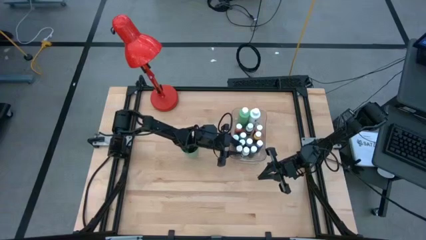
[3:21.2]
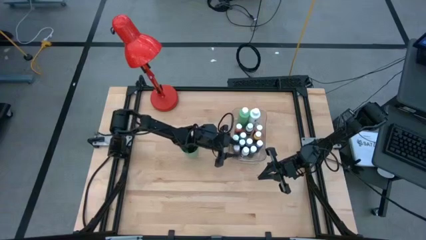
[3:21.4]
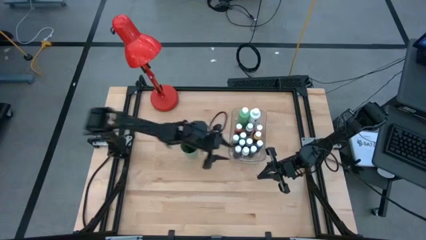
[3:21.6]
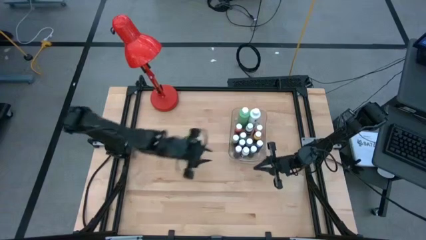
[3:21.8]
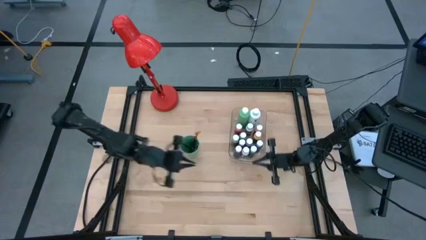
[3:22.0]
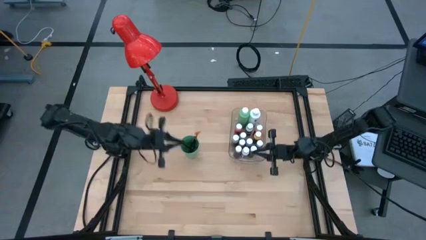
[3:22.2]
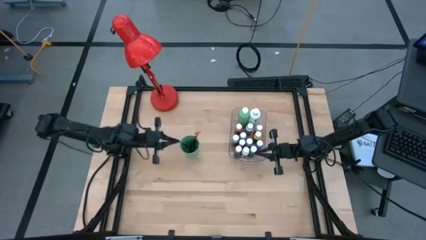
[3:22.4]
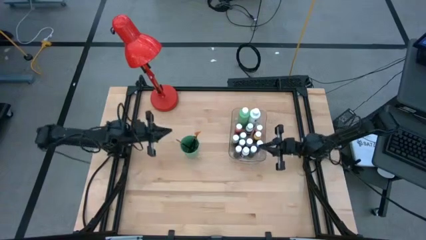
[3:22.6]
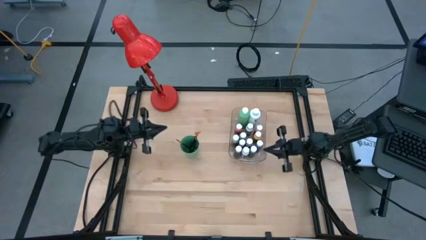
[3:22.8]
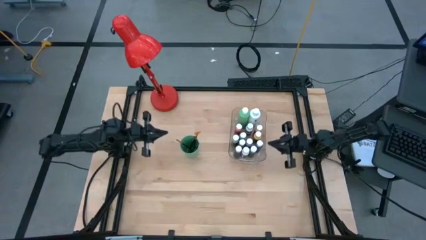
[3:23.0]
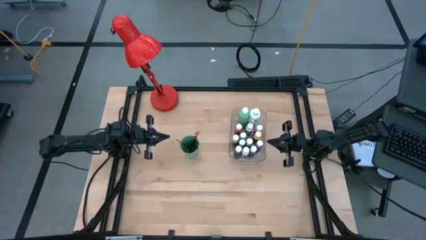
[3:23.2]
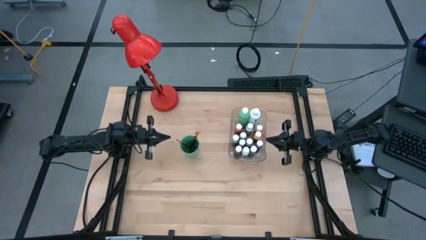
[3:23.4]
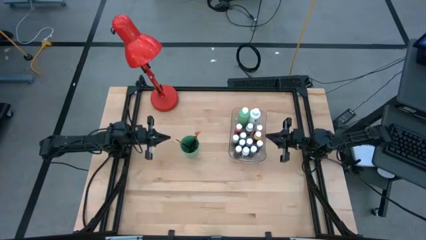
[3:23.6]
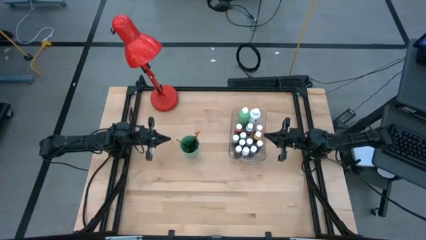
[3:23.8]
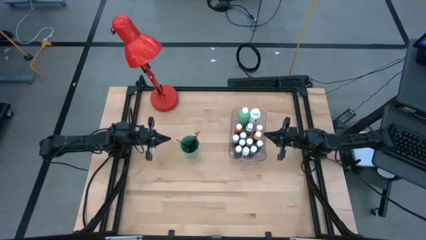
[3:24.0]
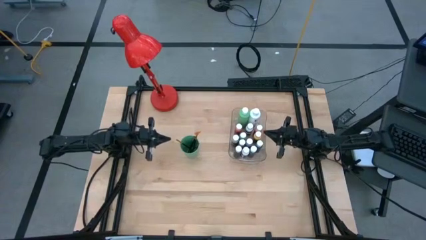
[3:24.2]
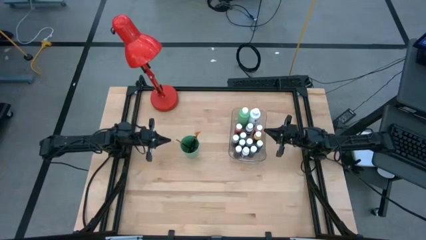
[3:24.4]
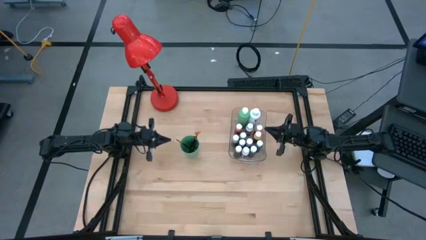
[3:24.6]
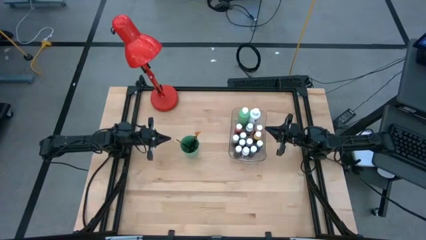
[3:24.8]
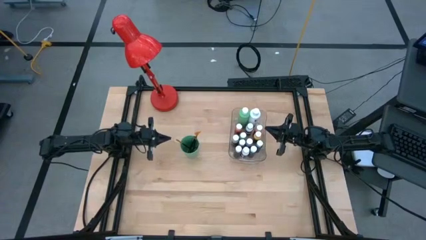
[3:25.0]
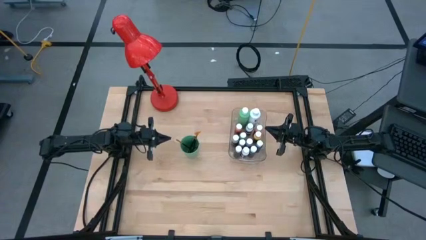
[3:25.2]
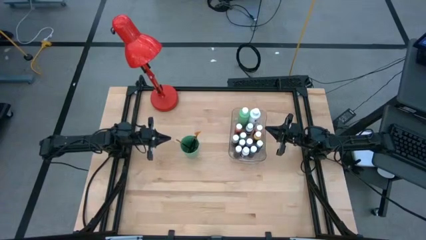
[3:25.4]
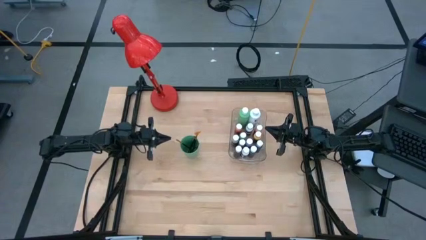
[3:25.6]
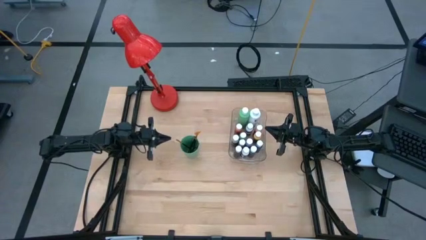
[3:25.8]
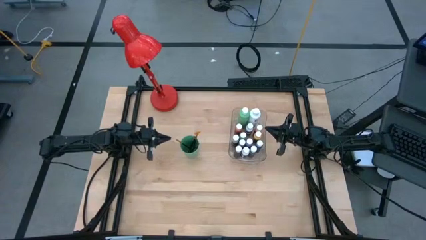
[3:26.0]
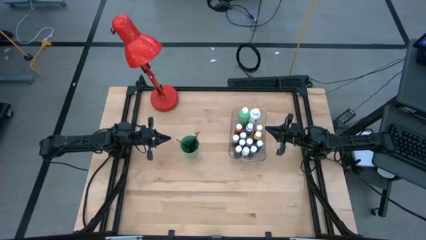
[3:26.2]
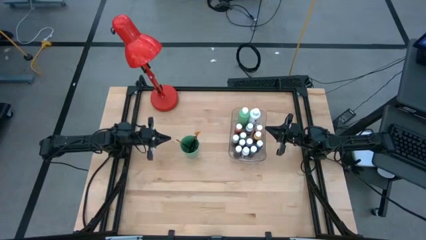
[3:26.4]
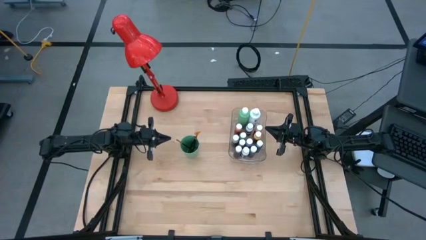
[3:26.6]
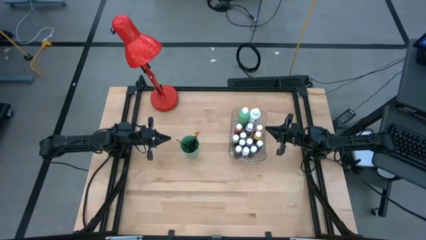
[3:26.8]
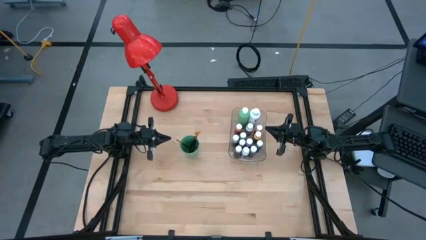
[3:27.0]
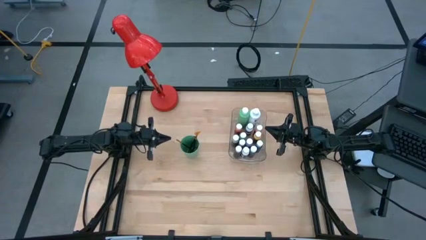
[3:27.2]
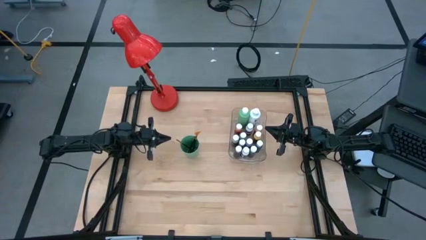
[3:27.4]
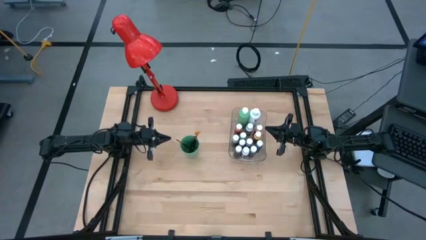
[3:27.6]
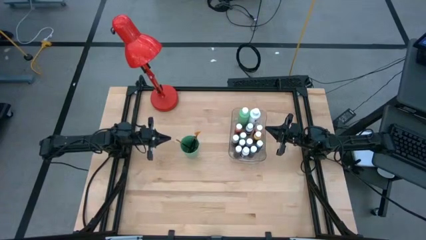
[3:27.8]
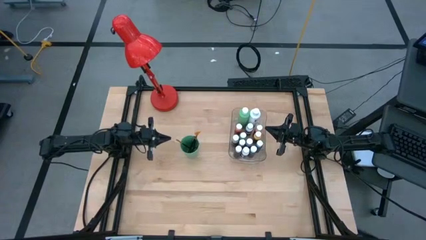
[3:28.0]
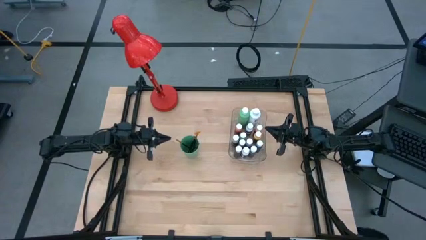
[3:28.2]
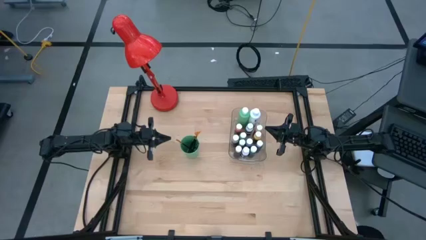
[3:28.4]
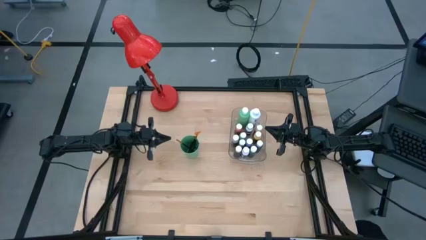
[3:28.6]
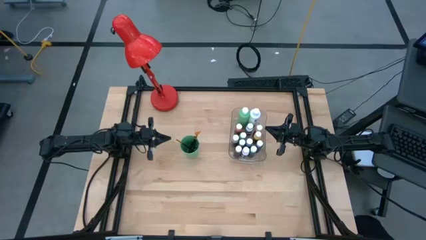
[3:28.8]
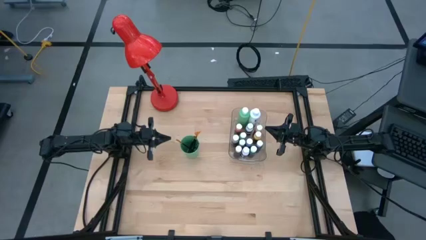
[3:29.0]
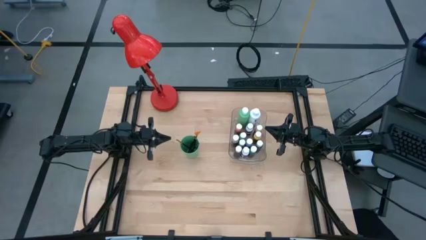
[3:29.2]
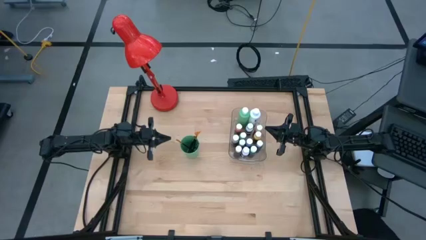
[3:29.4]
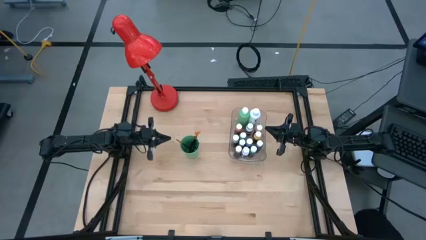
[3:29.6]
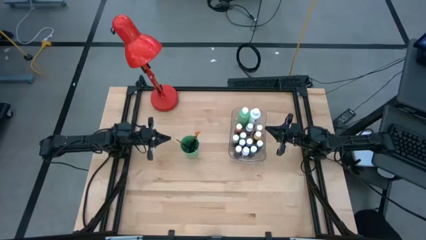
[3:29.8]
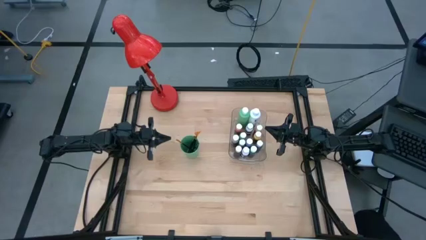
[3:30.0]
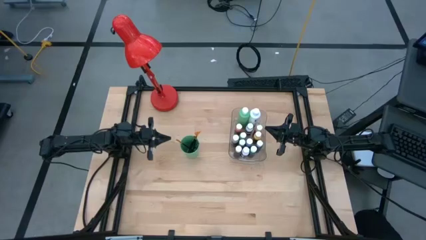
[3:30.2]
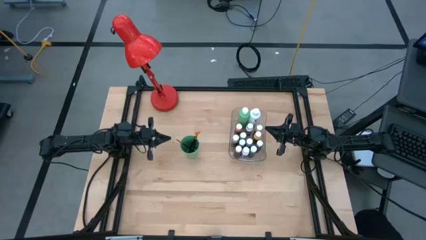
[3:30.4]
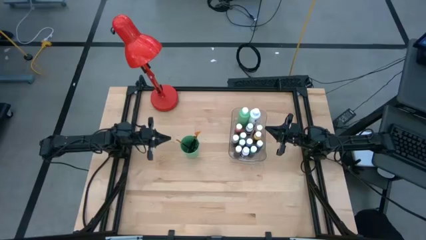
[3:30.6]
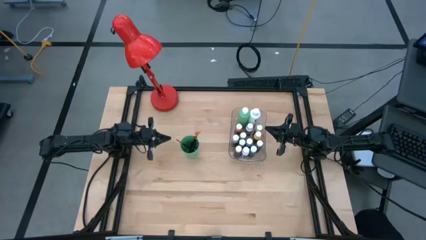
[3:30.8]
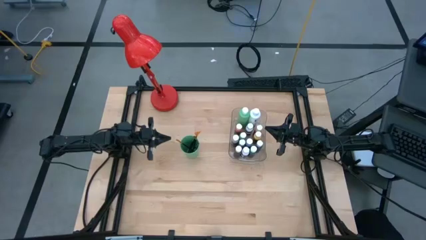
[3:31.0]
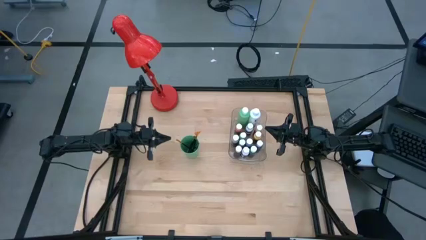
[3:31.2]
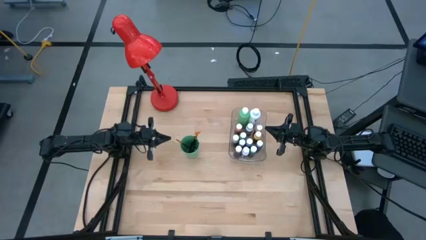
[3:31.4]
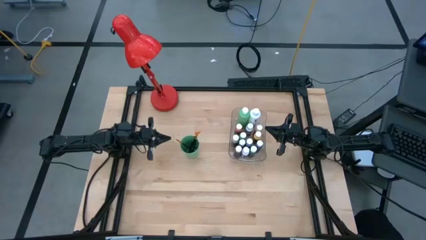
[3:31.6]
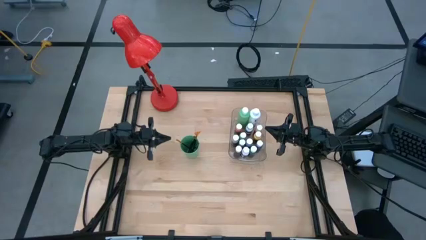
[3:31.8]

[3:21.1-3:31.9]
Task: Pick & Place Paint Supplies
Return to Home Position
